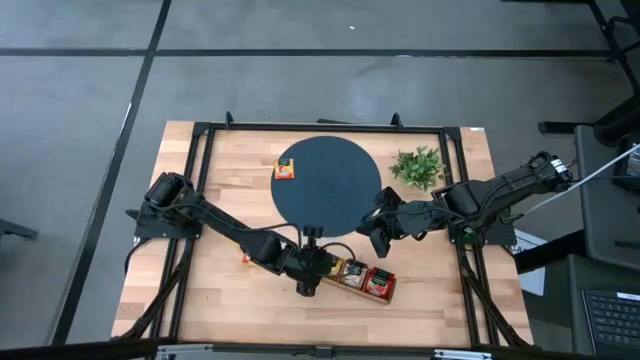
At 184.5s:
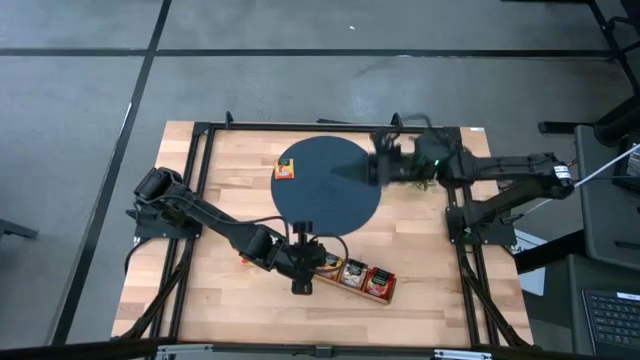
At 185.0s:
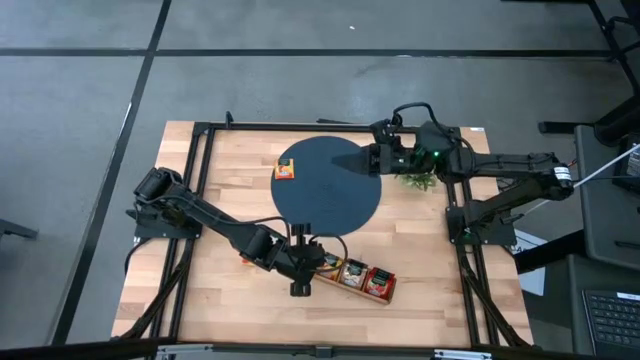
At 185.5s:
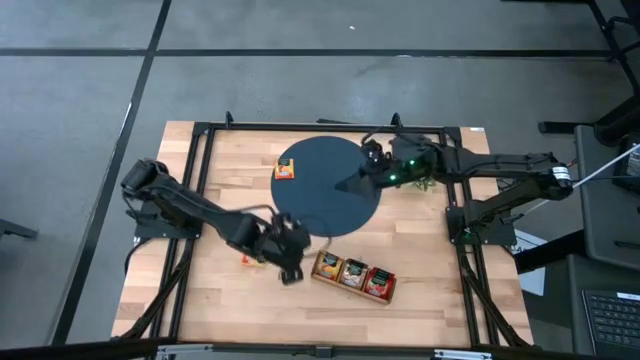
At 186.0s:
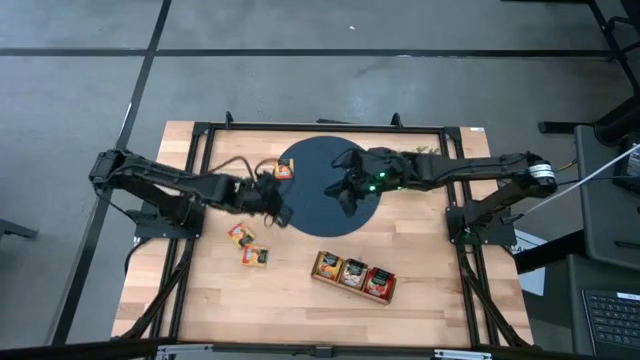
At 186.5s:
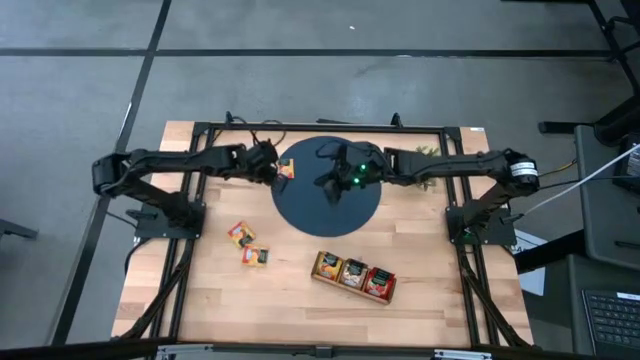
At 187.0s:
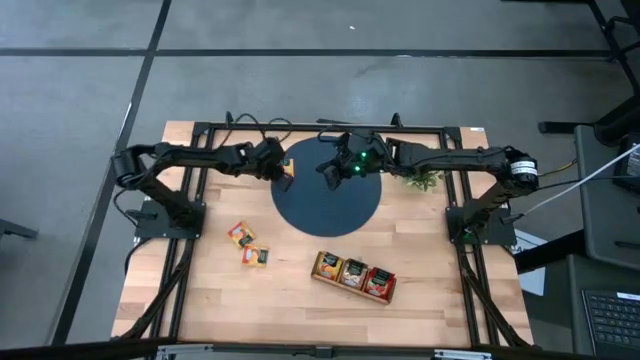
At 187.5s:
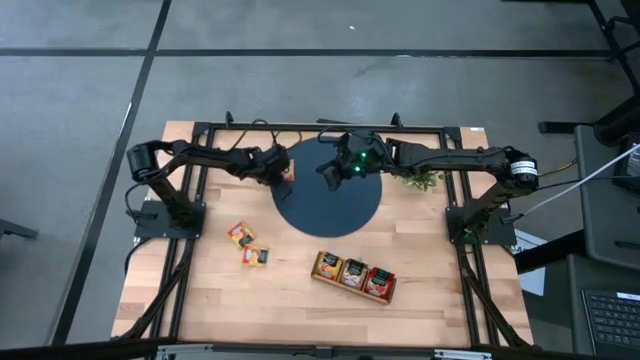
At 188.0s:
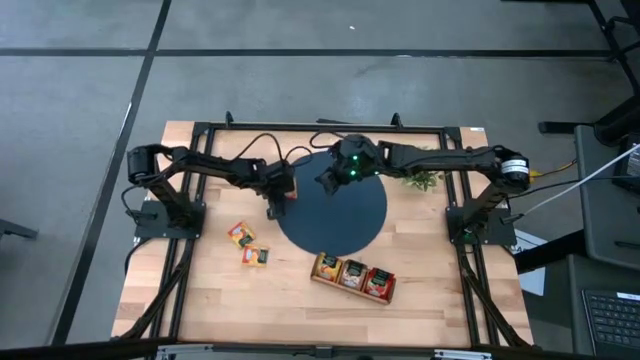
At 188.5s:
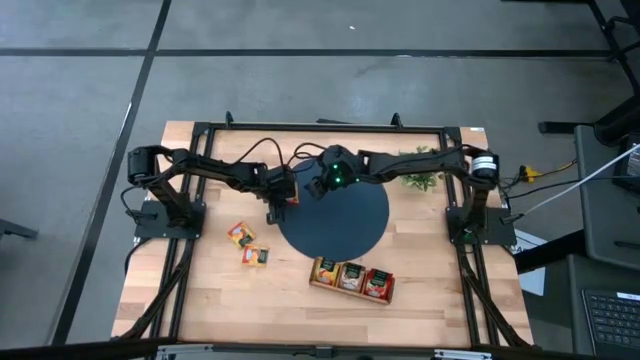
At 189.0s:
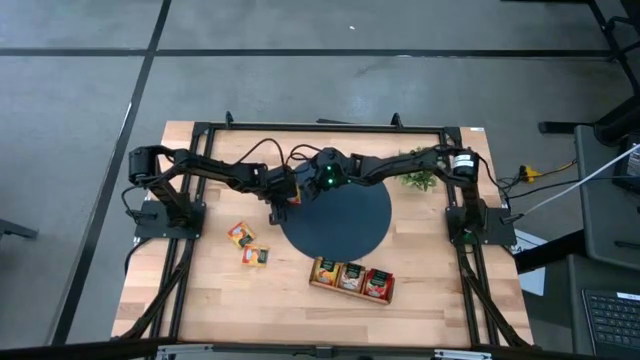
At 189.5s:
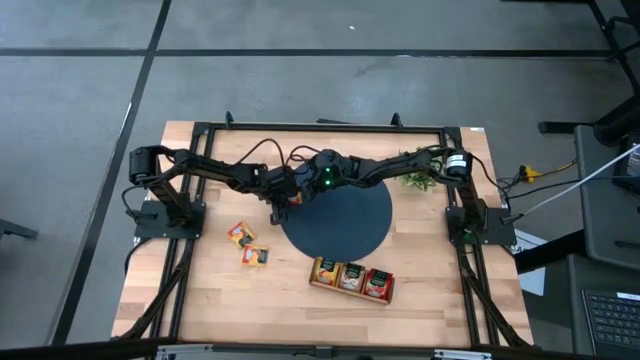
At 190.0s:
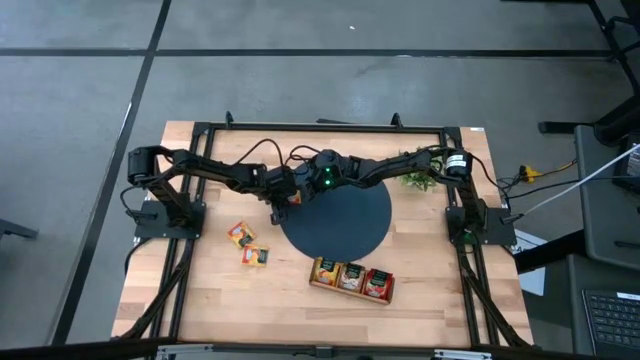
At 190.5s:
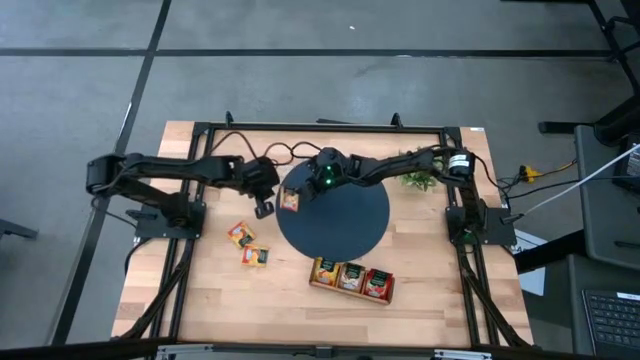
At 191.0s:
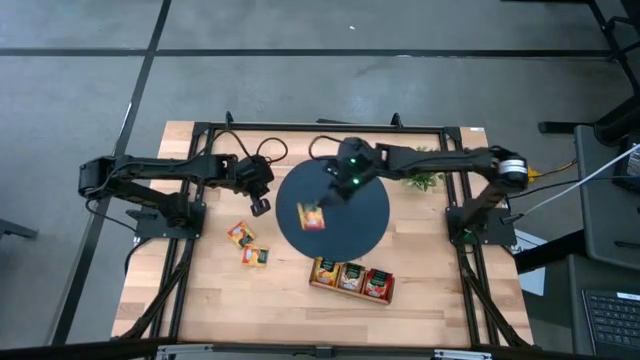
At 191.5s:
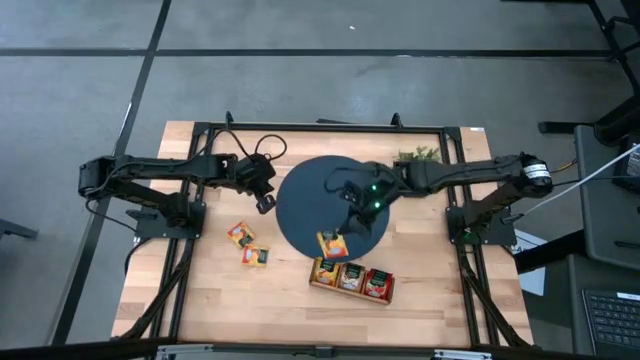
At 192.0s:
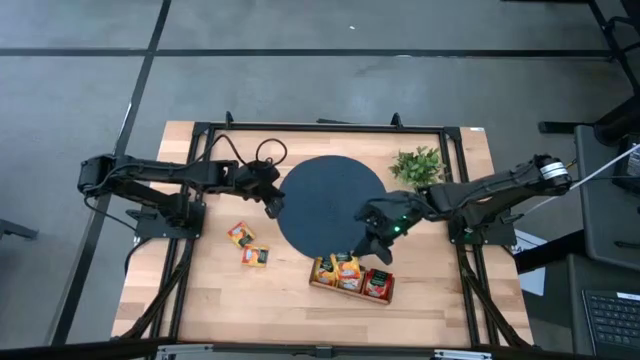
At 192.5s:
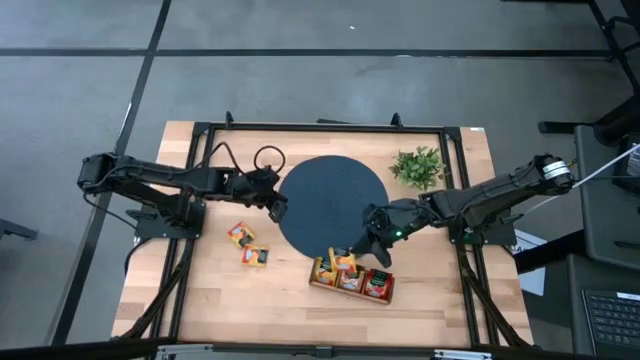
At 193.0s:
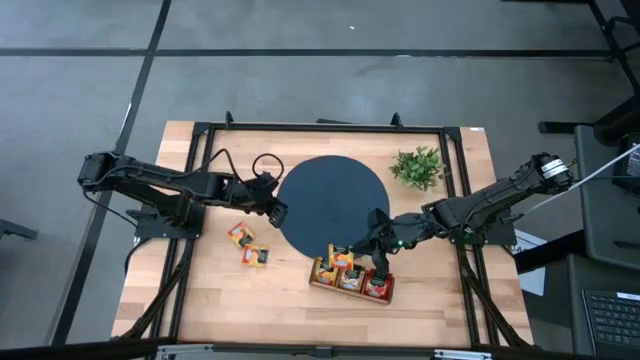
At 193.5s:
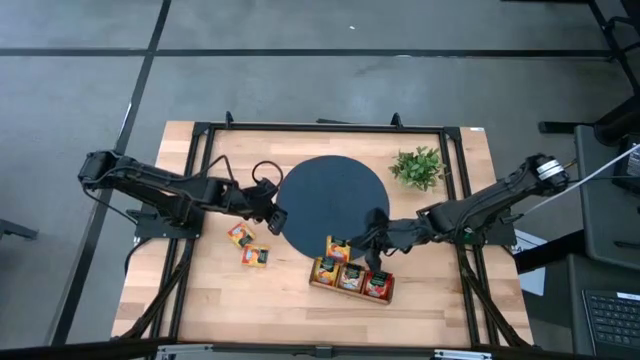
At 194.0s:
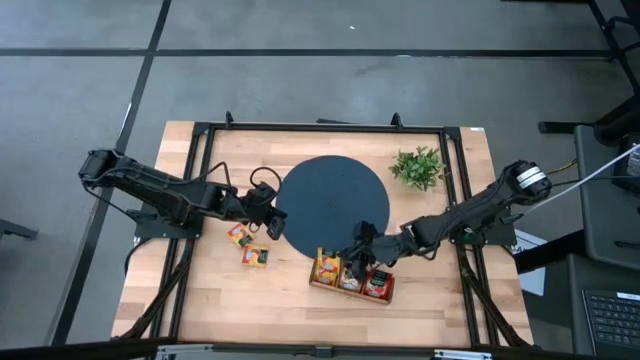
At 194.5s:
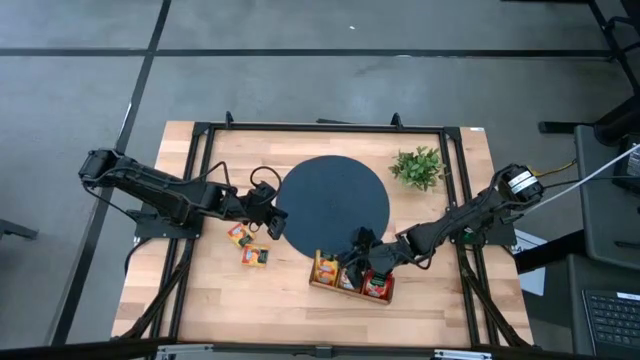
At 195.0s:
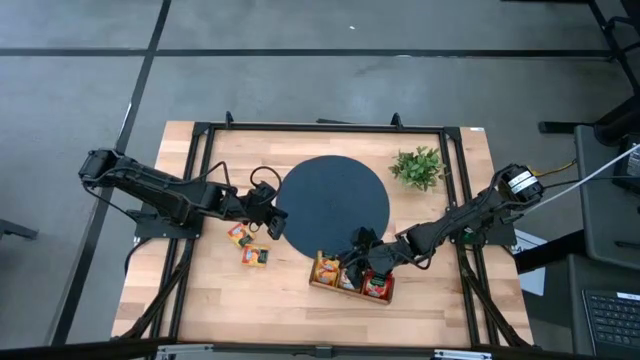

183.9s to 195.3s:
Task: Pick & Place Tea
Put the yellow tea bag into the left section of the wooden organizer

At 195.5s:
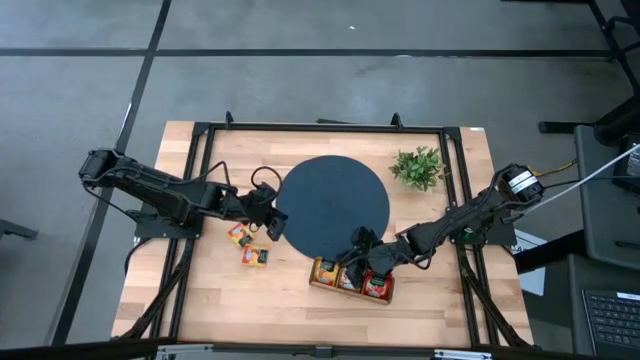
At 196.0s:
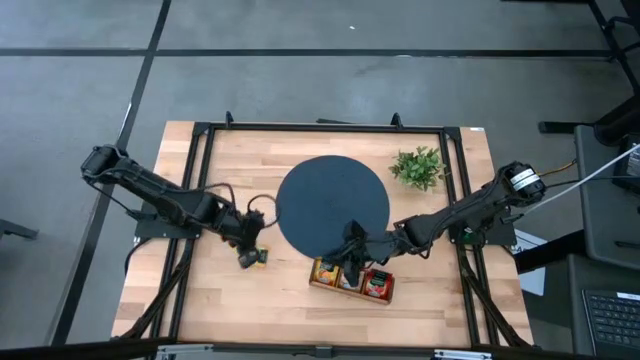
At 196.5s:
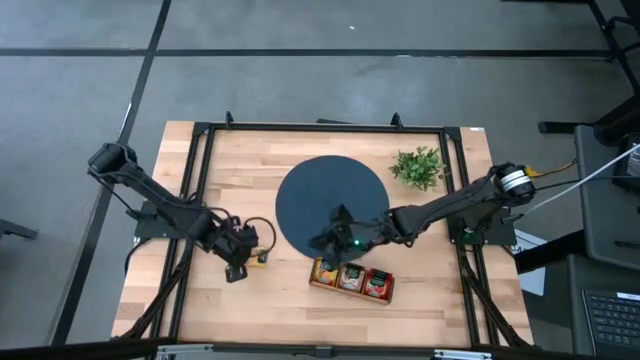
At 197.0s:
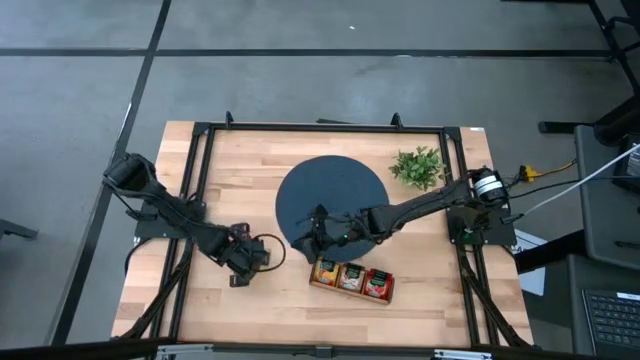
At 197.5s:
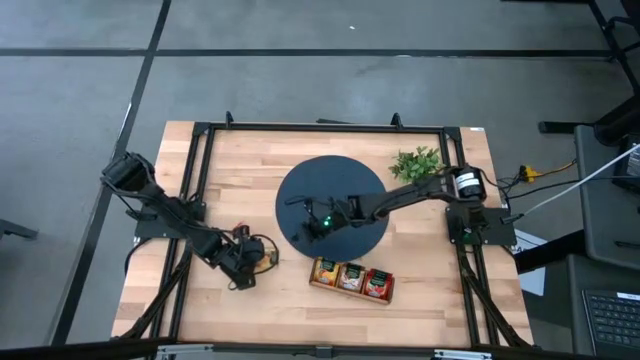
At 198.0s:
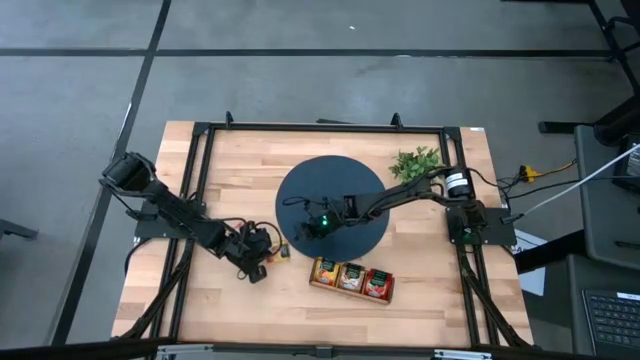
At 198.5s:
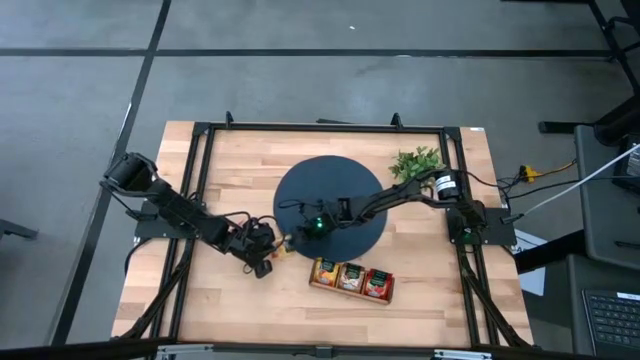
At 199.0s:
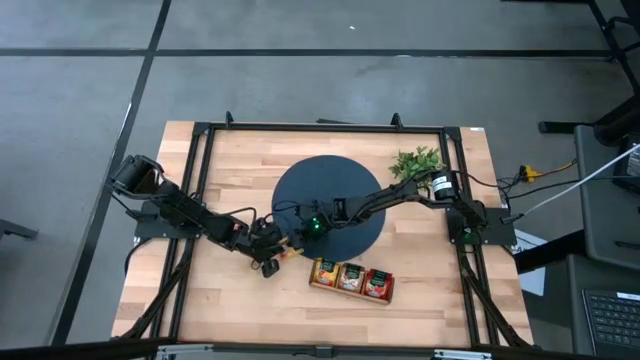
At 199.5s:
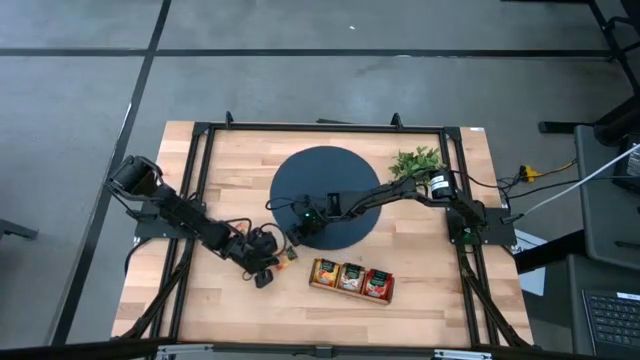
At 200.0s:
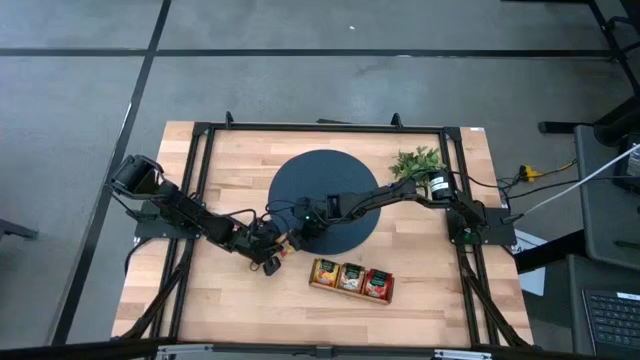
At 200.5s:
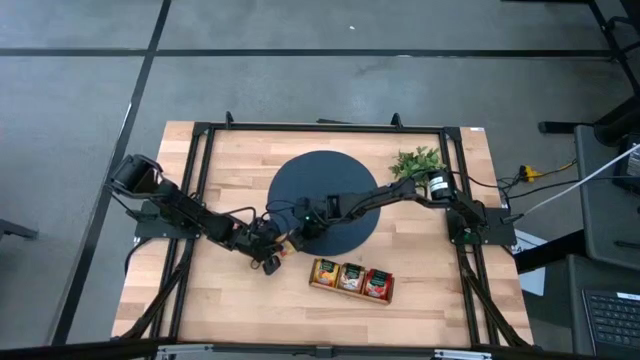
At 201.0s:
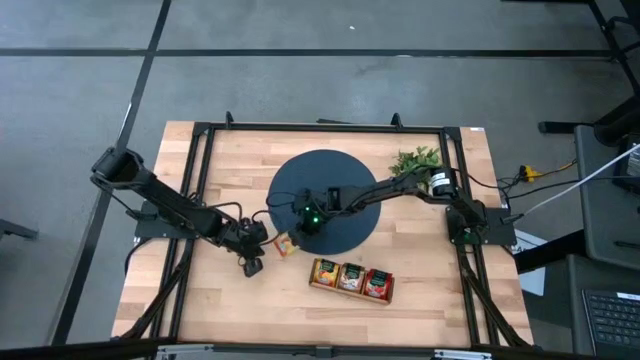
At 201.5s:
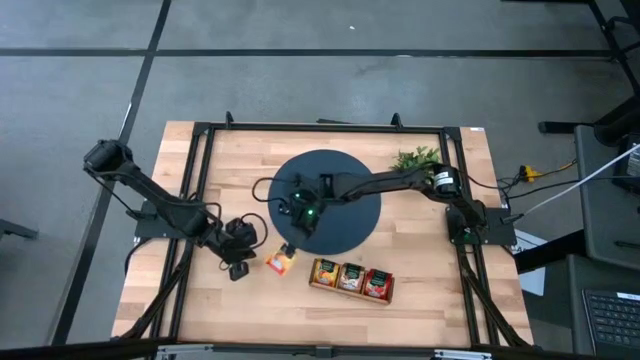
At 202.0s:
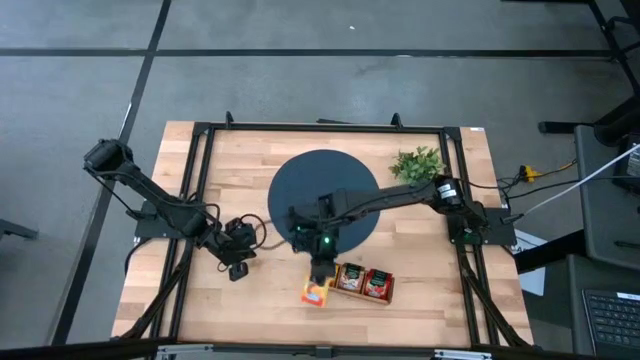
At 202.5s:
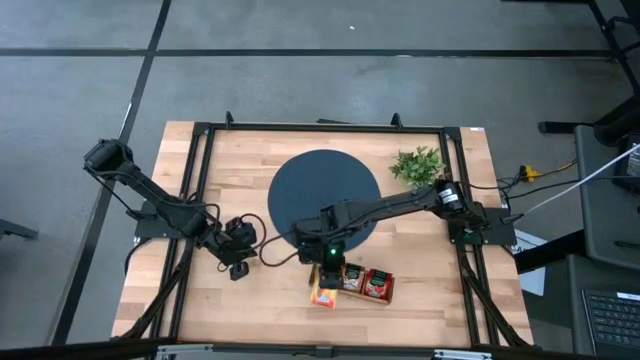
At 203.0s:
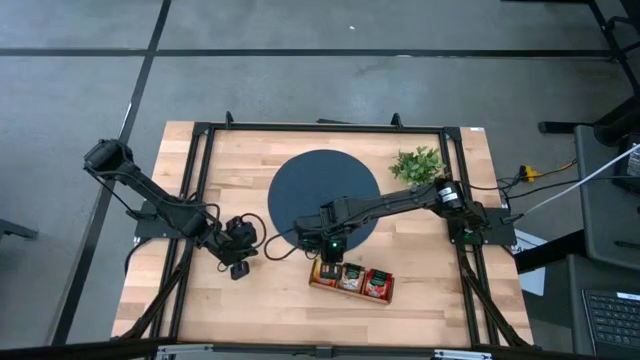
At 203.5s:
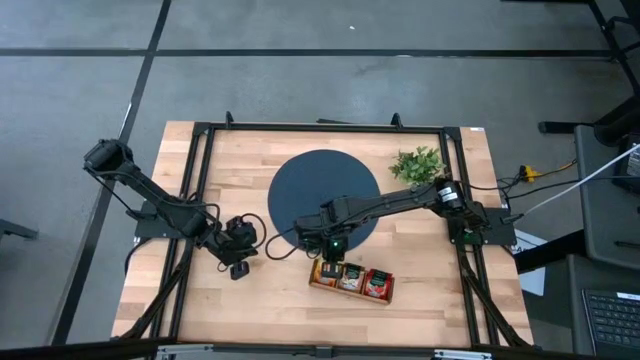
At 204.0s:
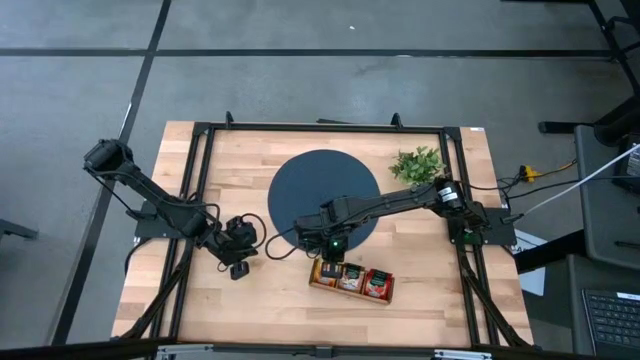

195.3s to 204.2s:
Put the yellow tea bag into the left section of the wooden organizer
